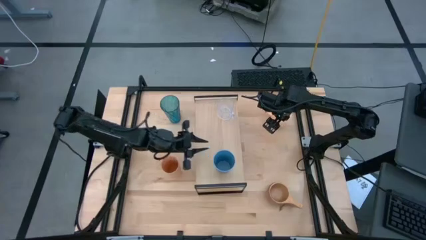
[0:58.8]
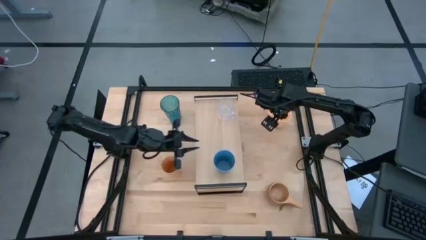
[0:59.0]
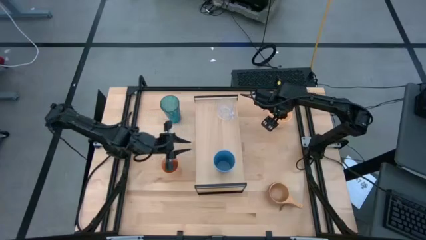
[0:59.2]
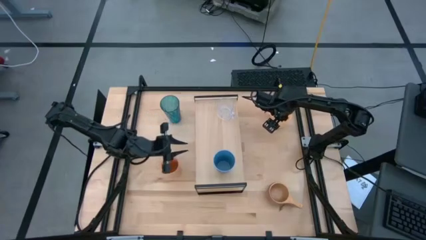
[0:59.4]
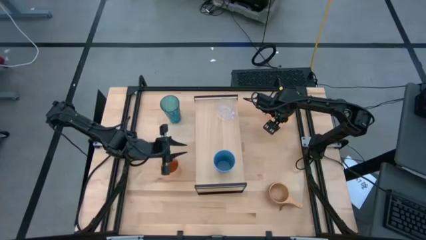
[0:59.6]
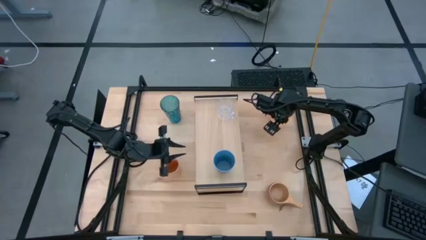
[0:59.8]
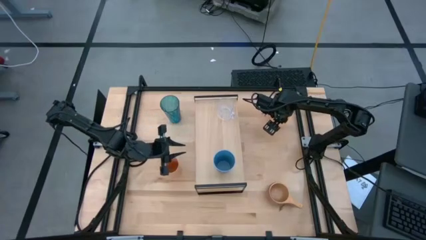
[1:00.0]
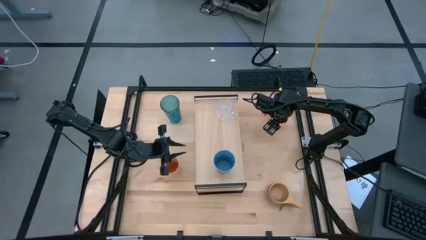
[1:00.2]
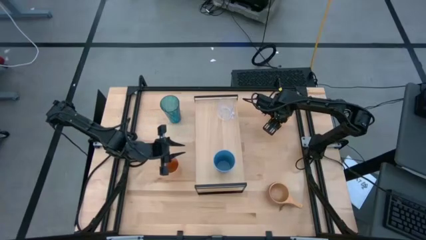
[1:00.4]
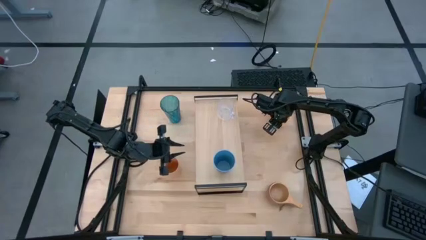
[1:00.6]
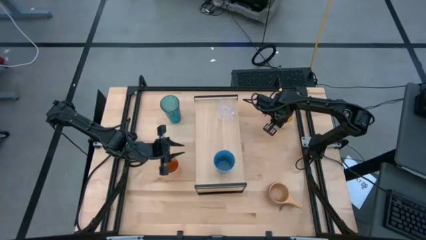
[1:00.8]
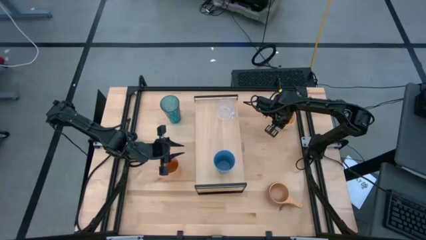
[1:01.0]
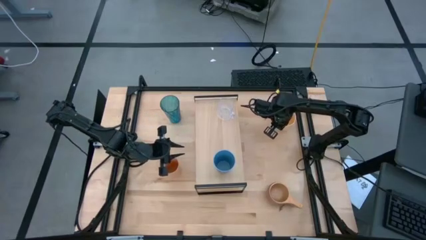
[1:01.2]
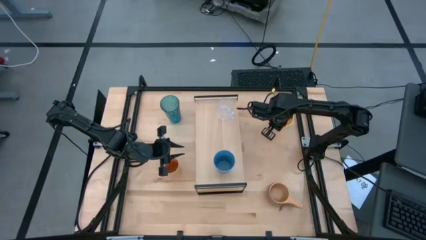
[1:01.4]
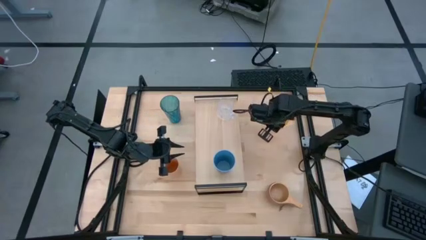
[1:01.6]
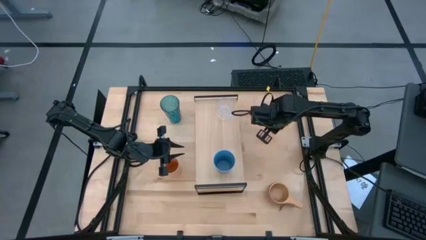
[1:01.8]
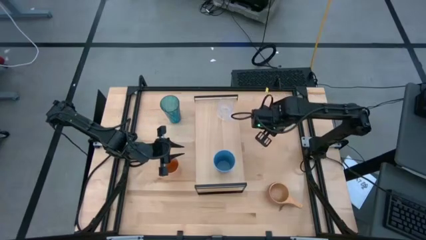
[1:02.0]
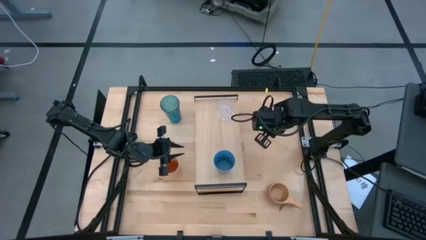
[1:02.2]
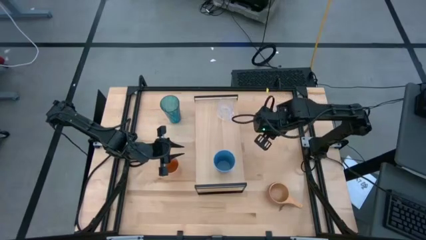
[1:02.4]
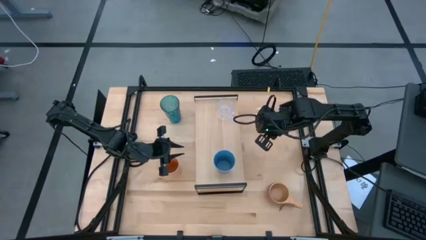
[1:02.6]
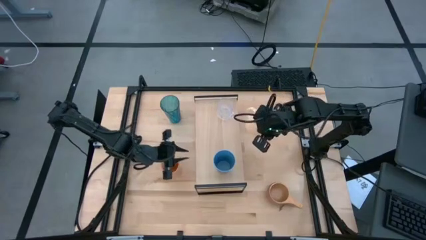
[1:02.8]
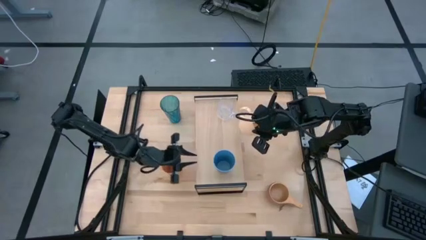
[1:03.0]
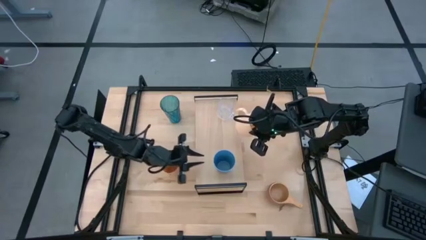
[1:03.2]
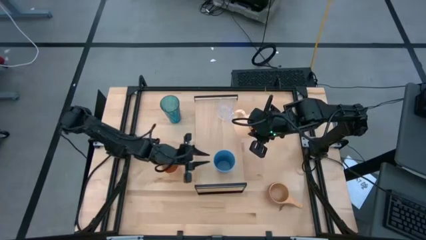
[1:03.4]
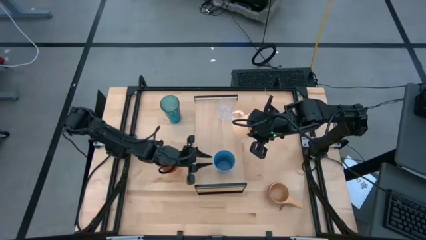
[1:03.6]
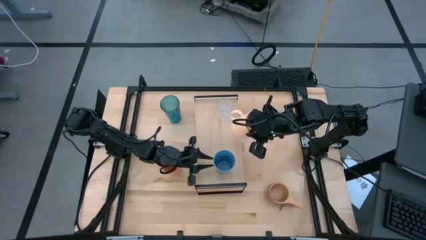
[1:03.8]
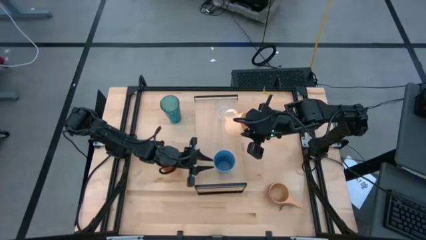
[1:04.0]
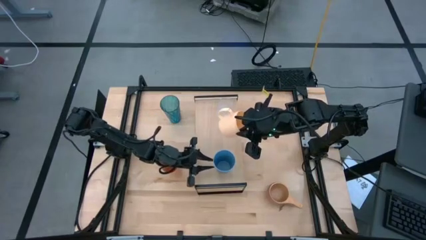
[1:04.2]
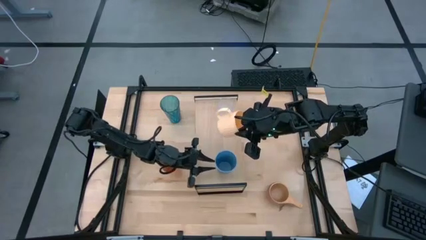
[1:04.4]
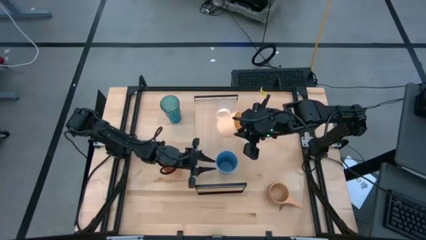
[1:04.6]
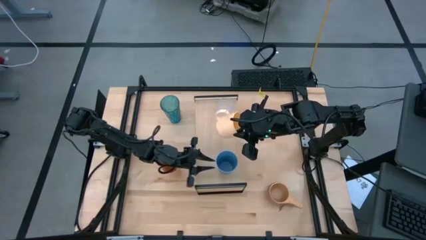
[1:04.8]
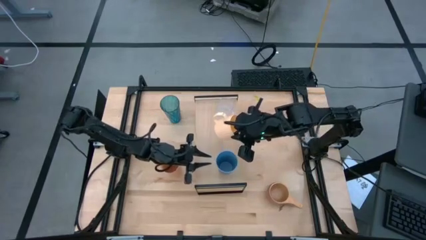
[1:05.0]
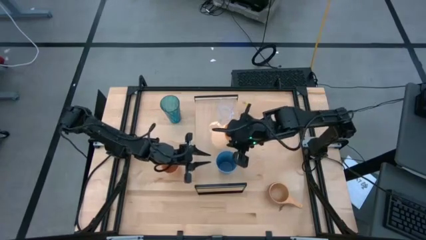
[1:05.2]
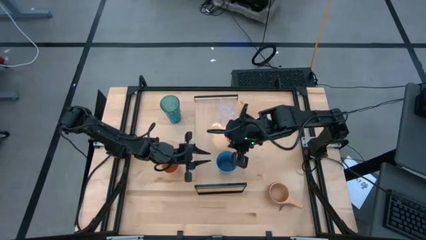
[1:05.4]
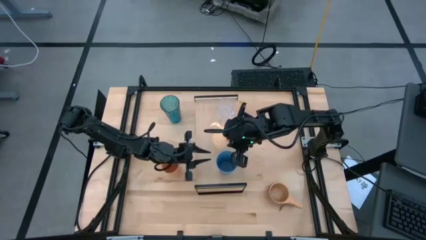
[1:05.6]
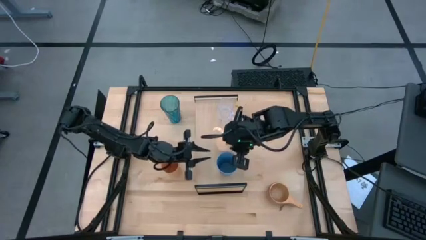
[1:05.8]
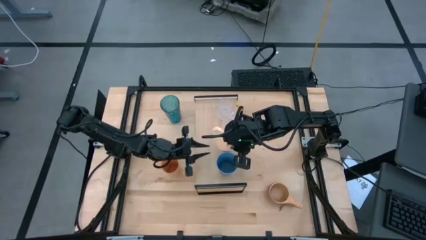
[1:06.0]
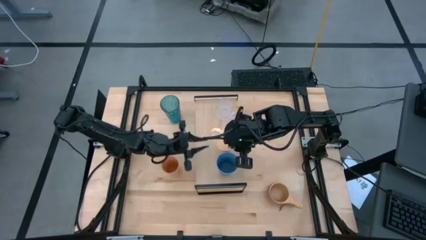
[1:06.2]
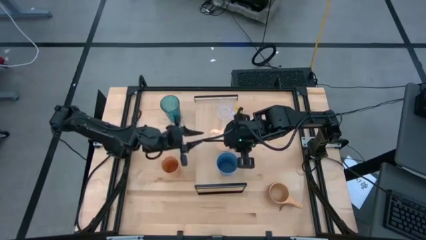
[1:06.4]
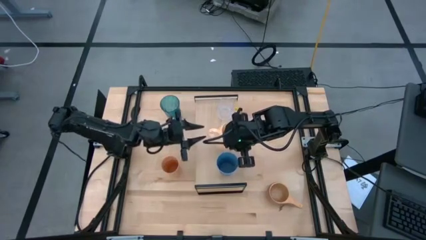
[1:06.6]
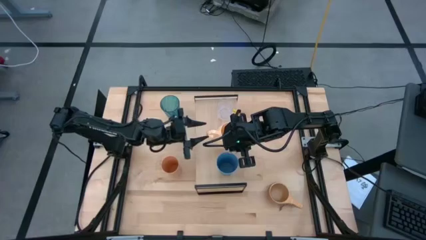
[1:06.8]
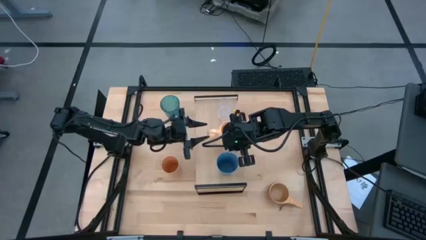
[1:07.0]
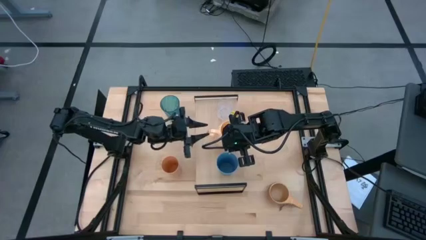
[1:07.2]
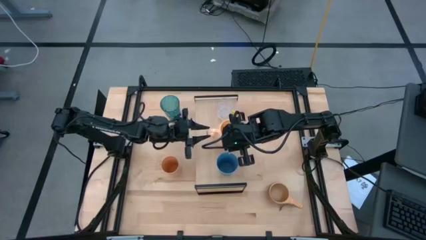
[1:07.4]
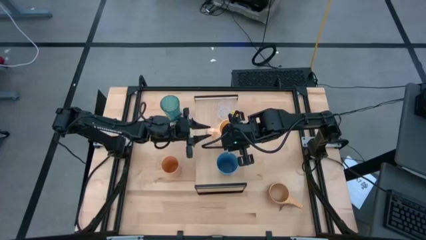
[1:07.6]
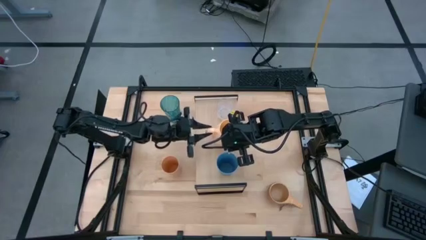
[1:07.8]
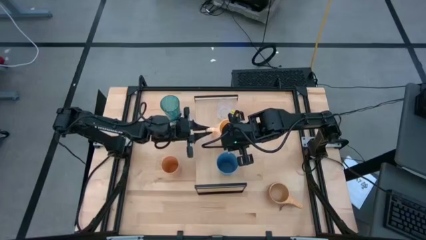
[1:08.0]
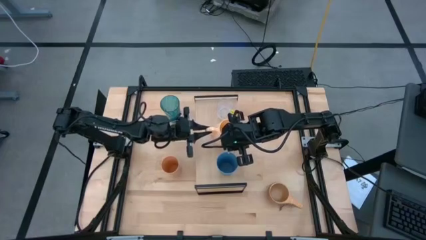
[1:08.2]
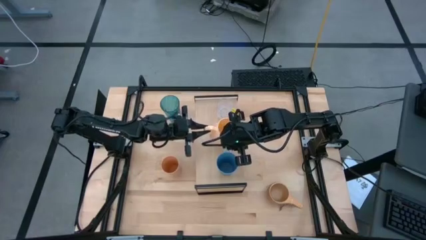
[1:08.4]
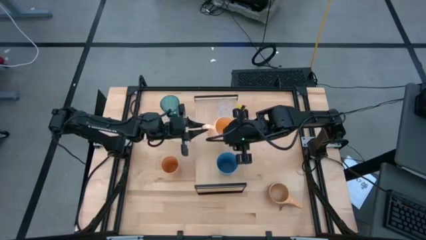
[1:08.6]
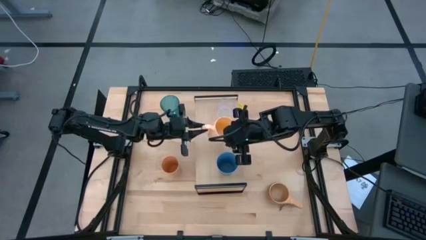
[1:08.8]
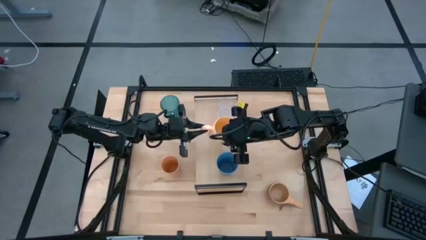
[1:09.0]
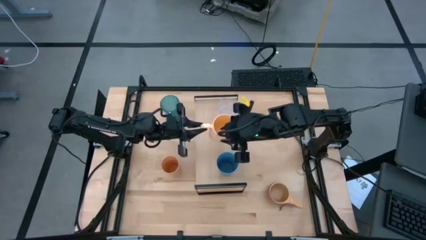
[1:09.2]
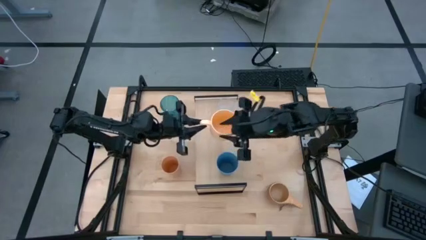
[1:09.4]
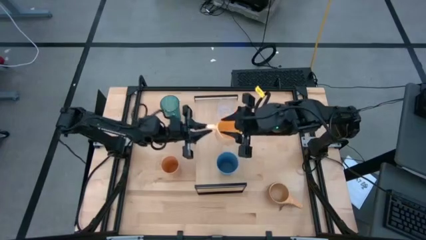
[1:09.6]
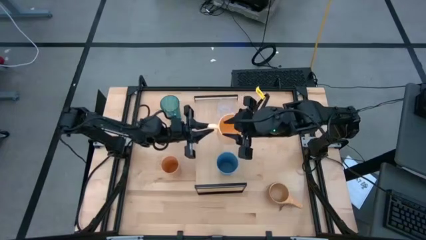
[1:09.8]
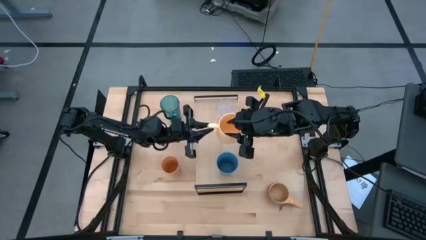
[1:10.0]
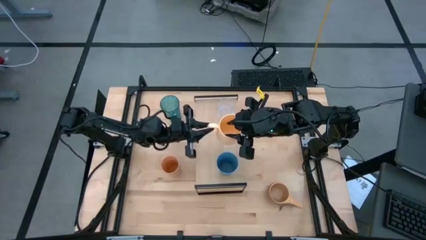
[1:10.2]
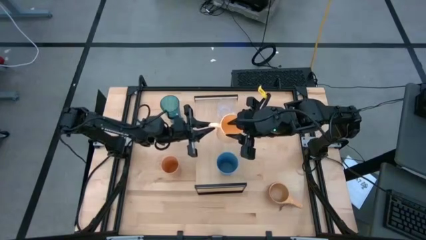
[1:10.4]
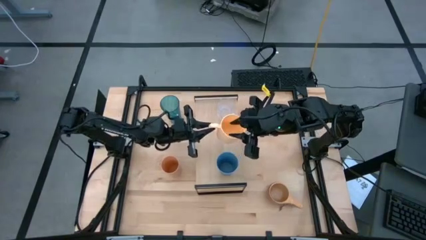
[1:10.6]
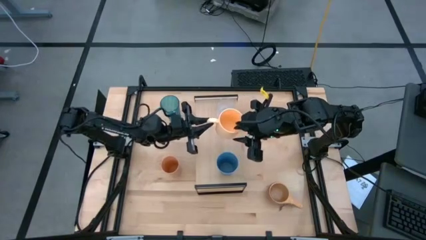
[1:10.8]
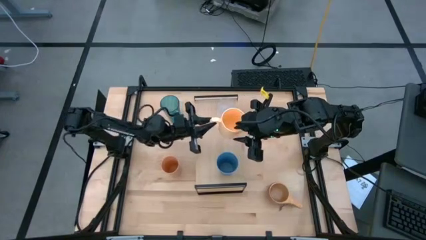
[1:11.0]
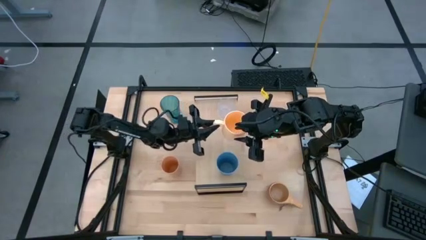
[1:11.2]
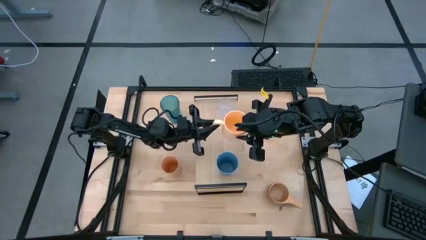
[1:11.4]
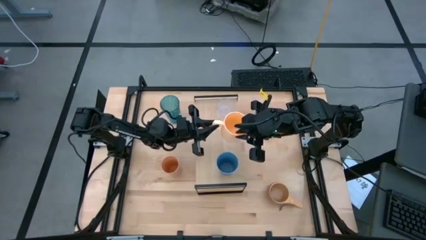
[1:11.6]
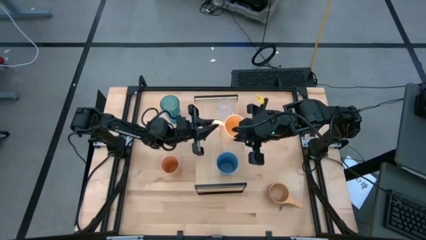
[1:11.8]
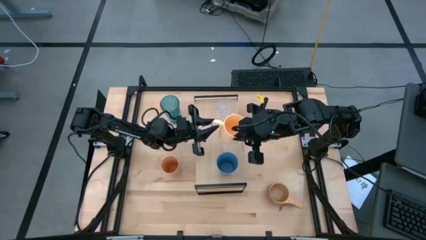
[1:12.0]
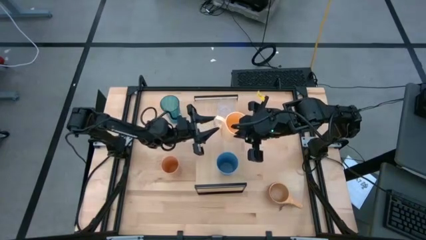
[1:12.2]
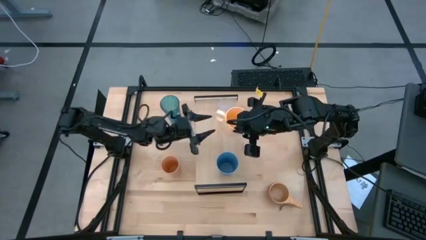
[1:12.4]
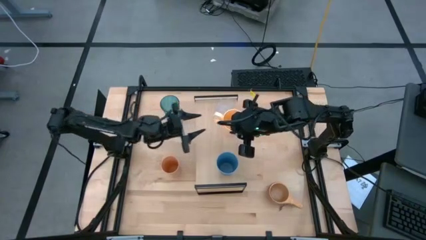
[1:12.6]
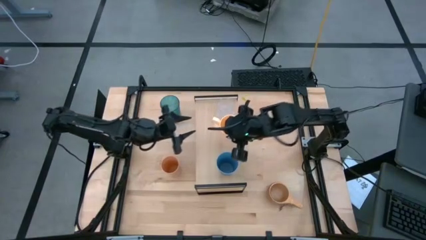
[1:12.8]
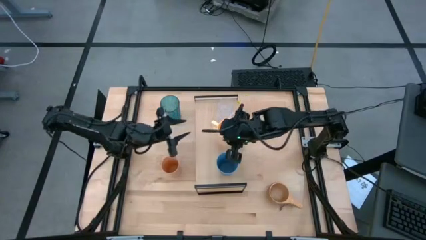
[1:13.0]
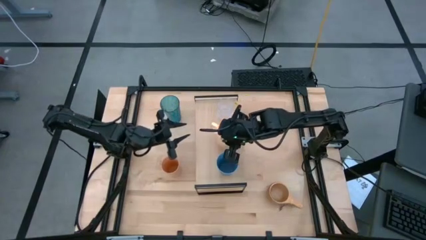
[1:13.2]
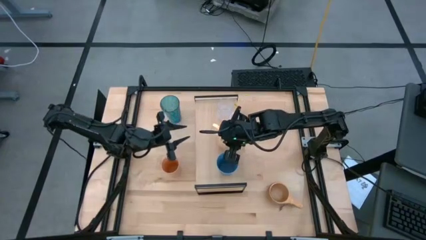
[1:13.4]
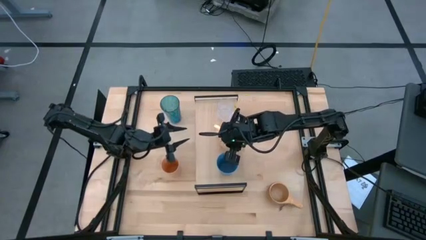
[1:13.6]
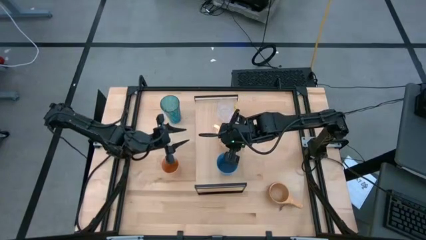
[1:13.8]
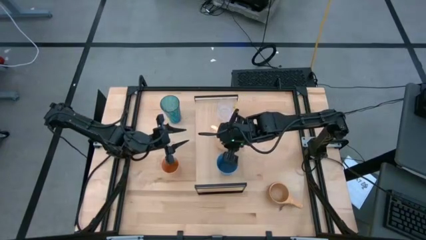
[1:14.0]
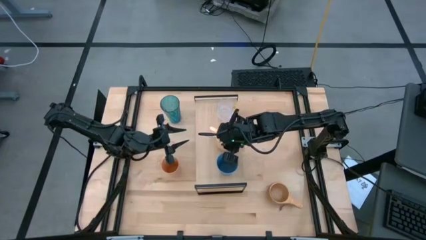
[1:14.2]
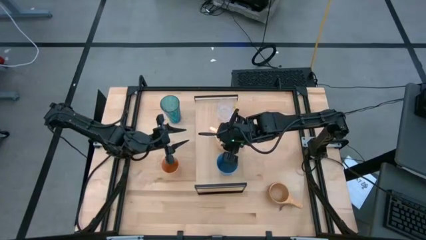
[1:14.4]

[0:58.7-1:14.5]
Task: Stack small to large cups/mugs on shelf
Put the light orange mug on the shelf
